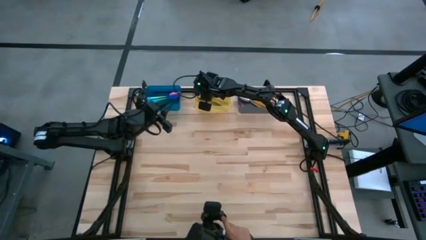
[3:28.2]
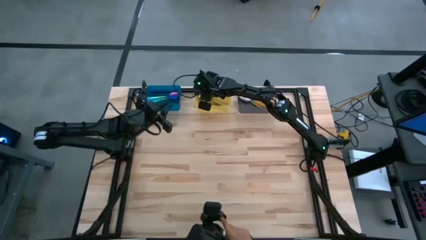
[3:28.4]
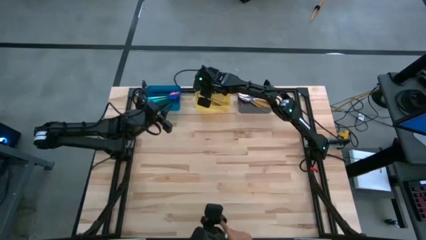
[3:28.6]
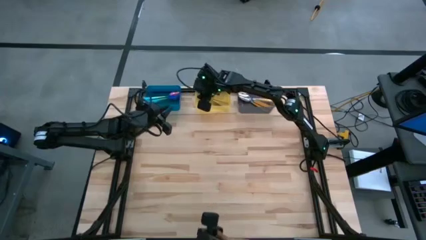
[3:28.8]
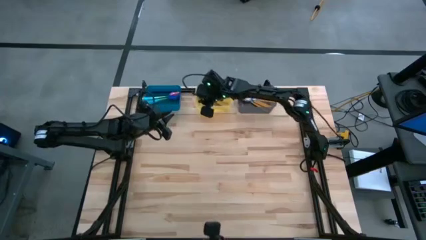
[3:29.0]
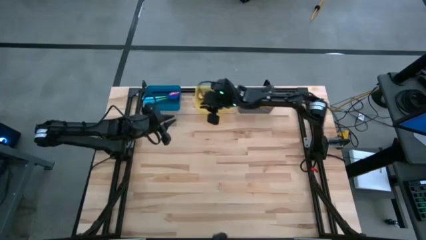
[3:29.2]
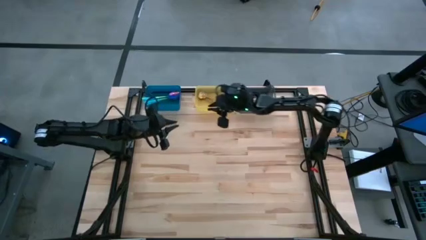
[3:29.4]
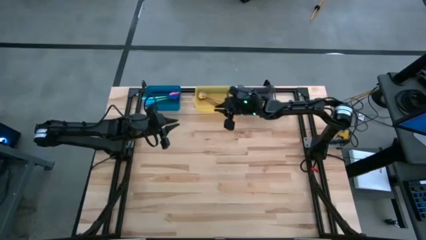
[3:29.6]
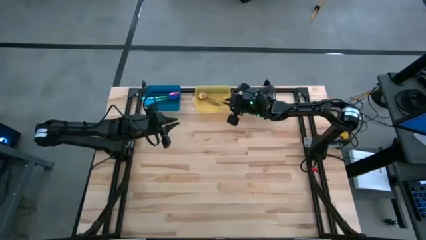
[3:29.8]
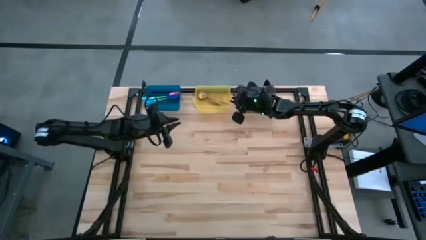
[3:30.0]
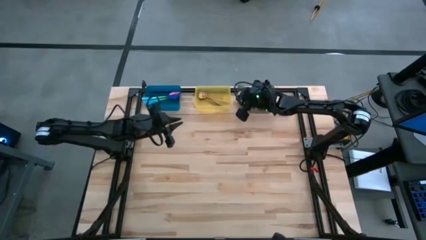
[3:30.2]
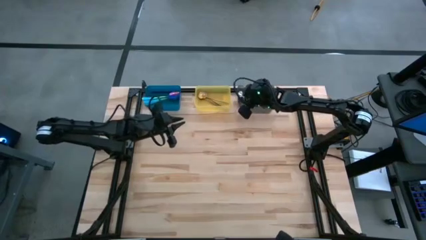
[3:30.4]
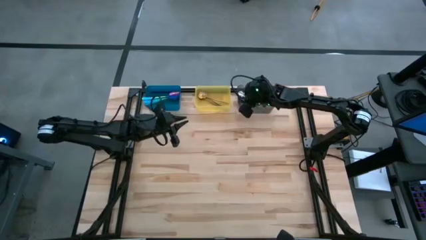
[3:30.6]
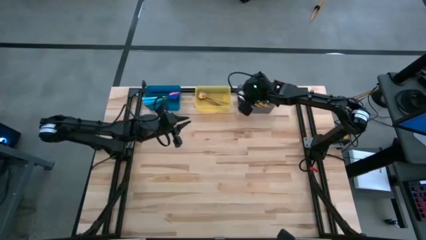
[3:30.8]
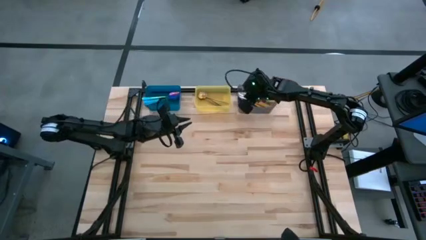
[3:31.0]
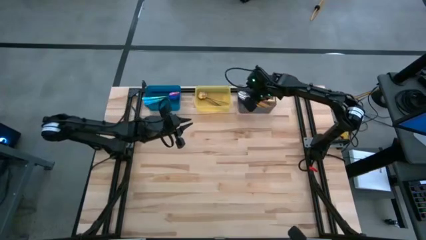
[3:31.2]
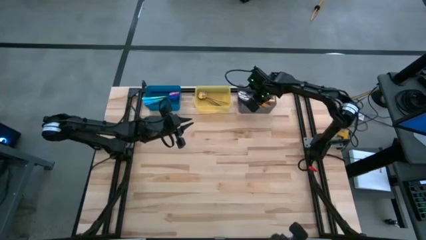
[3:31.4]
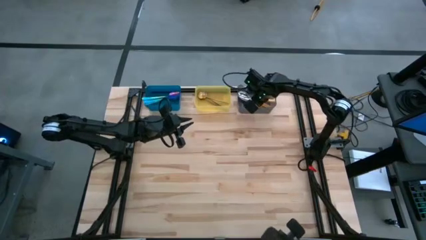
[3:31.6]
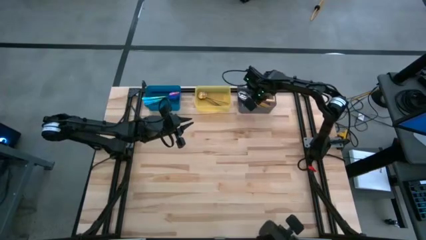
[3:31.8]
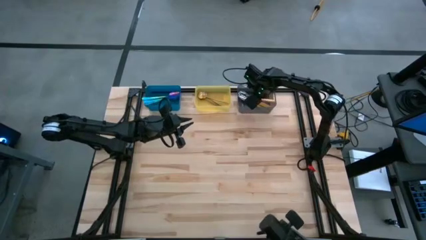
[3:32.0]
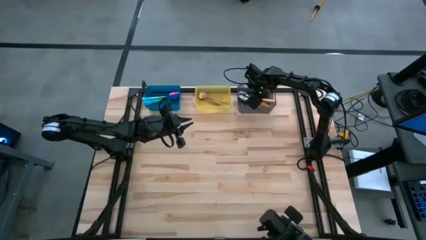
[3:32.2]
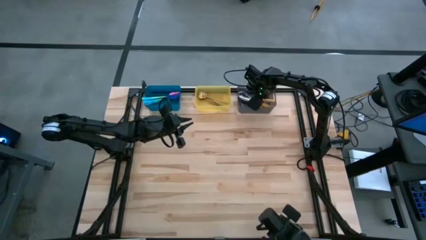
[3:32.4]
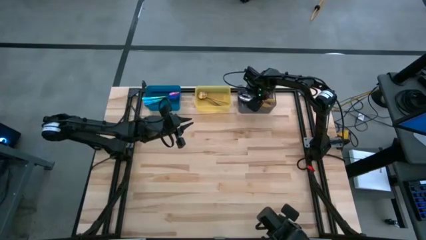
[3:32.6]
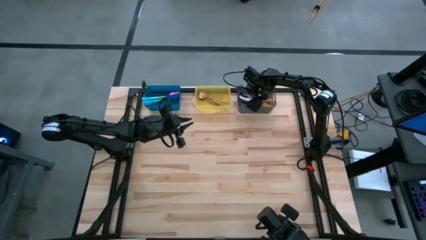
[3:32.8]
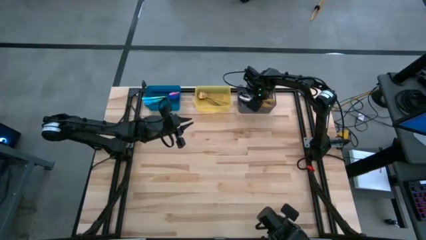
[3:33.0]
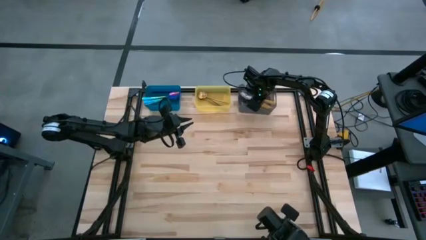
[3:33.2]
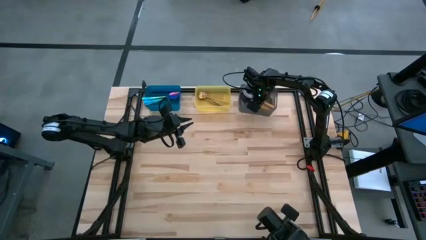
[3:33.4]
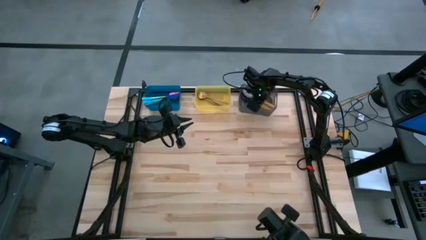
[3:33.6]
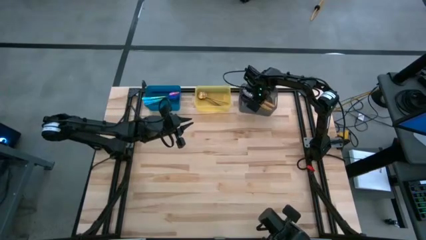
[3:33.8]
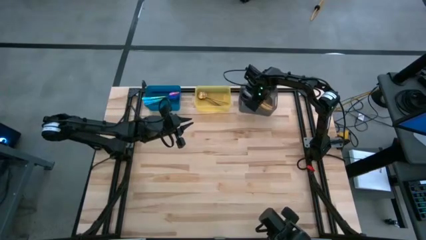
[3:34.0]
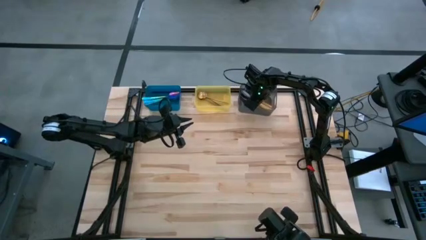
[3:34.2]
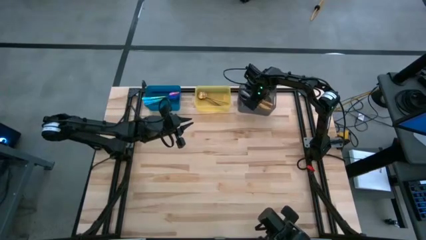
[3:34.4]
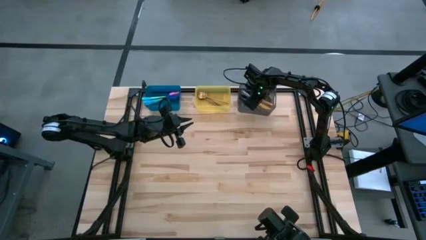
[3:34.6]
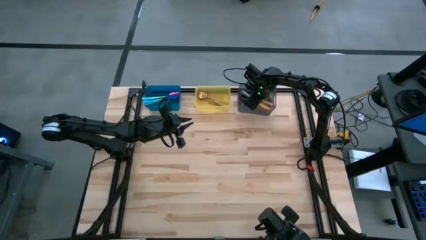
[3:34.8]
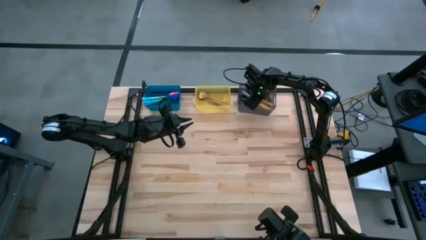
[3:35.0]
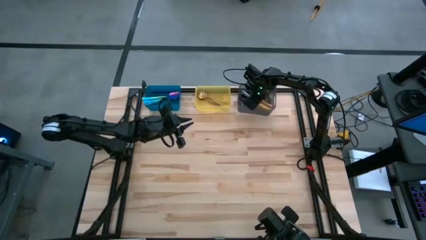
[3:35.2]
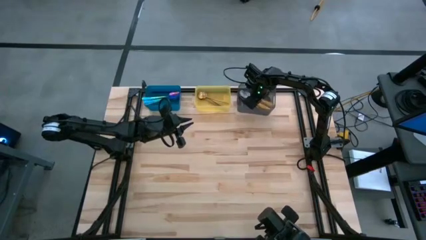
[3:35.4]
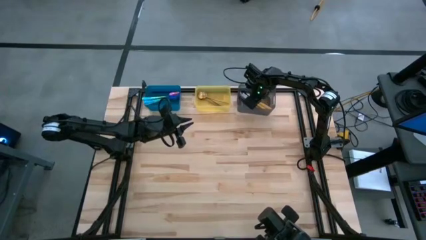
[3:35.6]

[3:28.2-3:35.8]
Task: Sort silverware by color (type)
Adjust the yellow spoon in the black bin

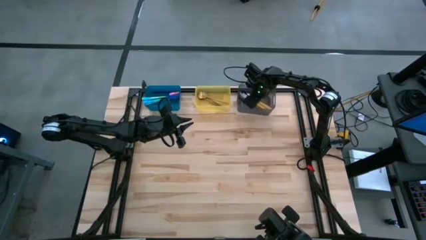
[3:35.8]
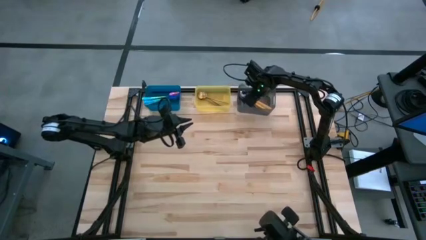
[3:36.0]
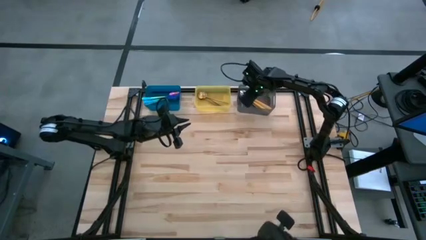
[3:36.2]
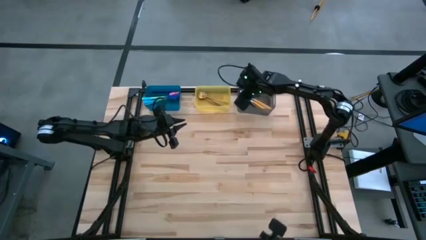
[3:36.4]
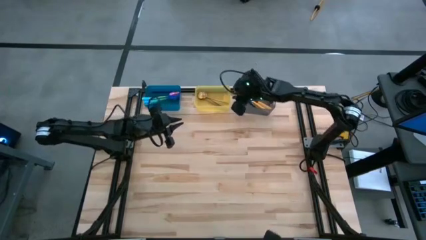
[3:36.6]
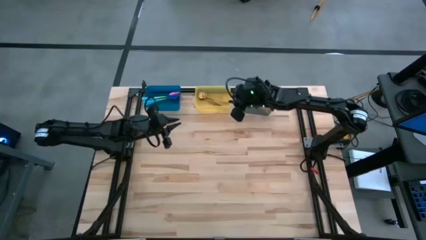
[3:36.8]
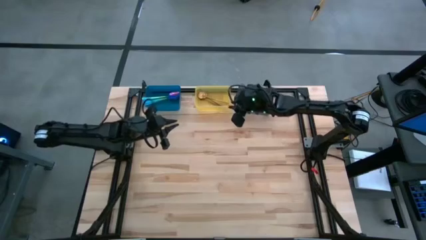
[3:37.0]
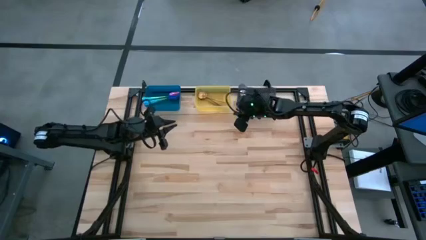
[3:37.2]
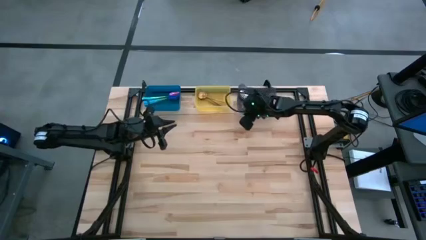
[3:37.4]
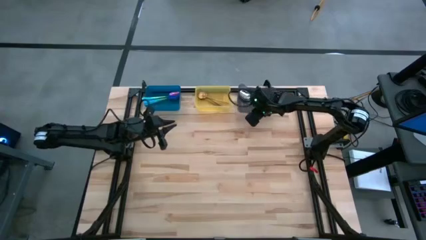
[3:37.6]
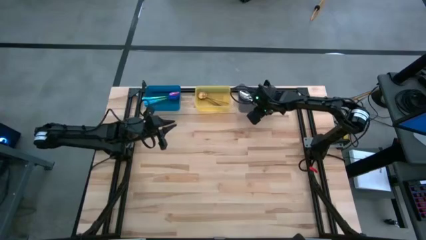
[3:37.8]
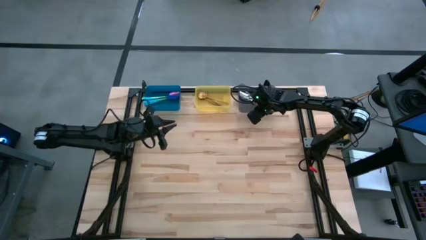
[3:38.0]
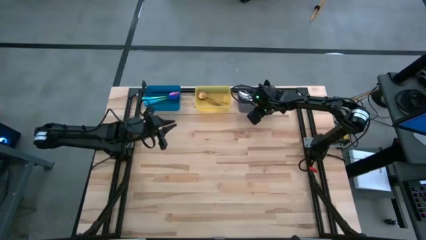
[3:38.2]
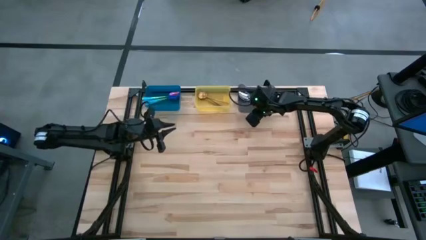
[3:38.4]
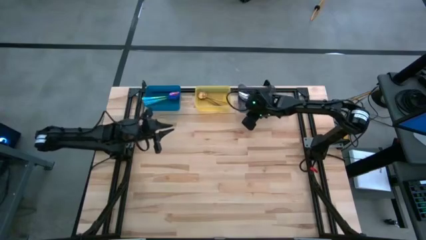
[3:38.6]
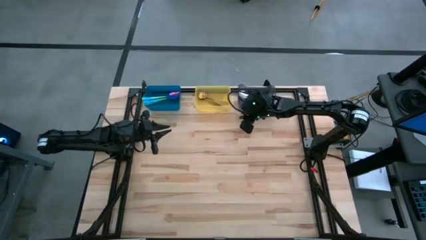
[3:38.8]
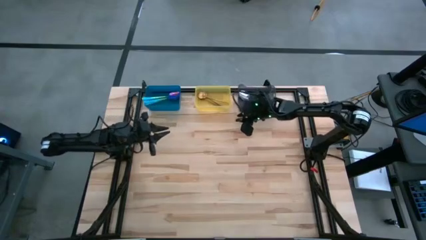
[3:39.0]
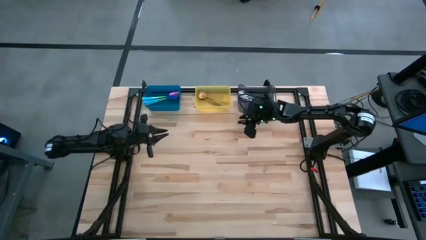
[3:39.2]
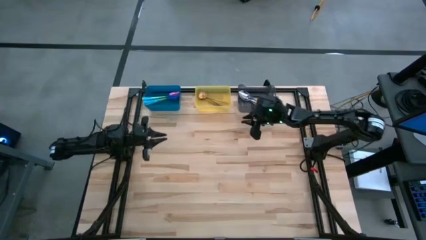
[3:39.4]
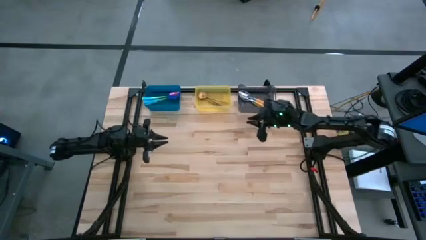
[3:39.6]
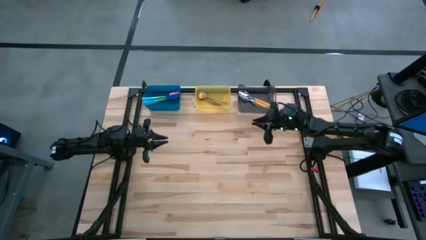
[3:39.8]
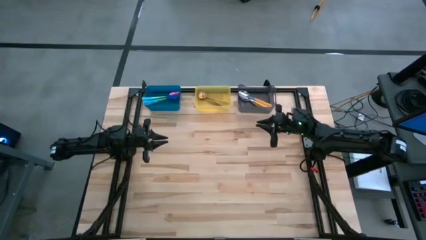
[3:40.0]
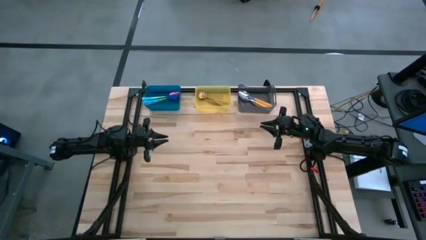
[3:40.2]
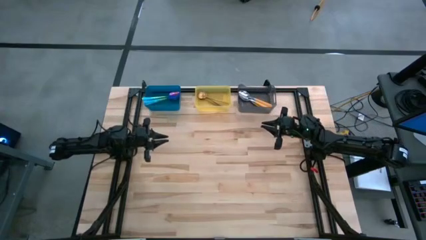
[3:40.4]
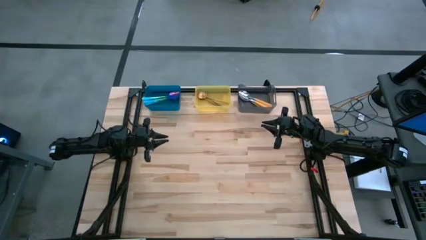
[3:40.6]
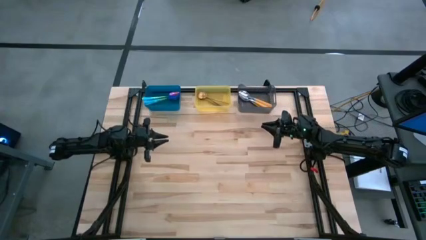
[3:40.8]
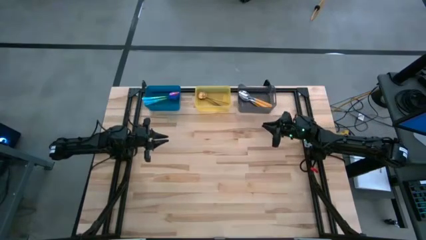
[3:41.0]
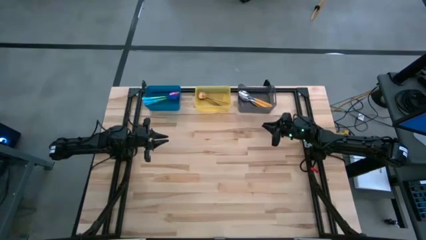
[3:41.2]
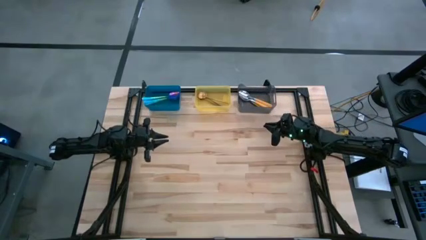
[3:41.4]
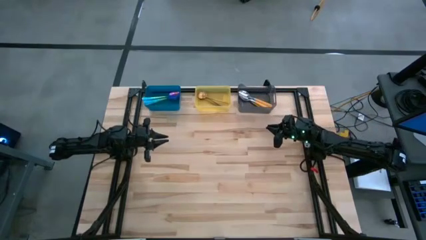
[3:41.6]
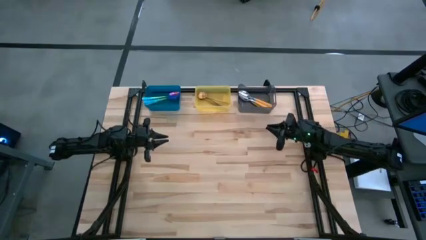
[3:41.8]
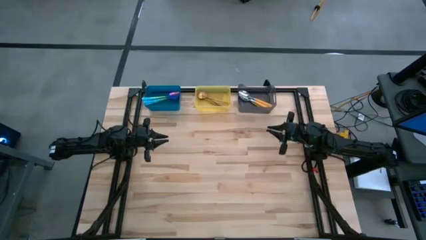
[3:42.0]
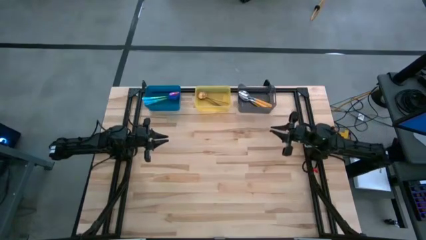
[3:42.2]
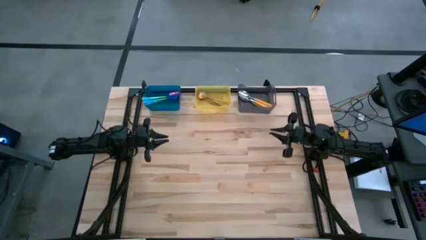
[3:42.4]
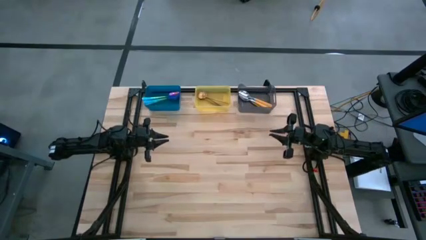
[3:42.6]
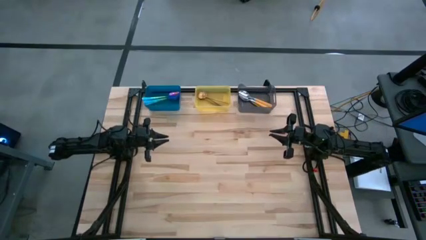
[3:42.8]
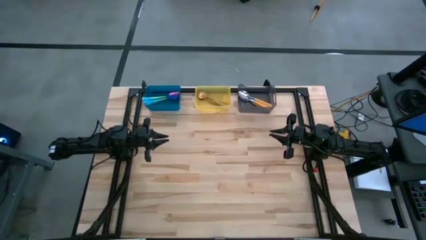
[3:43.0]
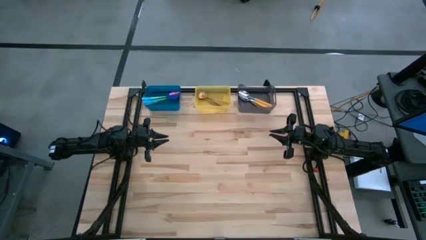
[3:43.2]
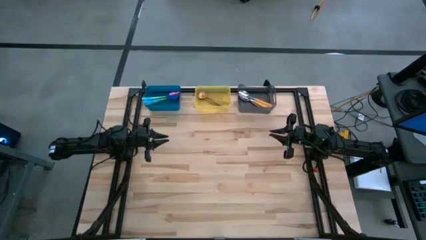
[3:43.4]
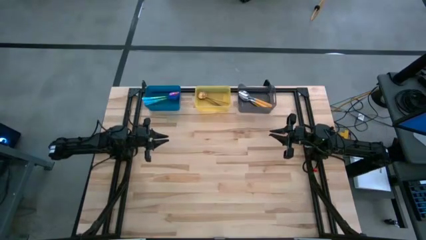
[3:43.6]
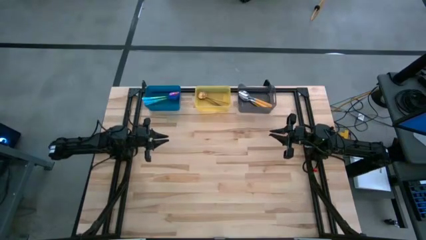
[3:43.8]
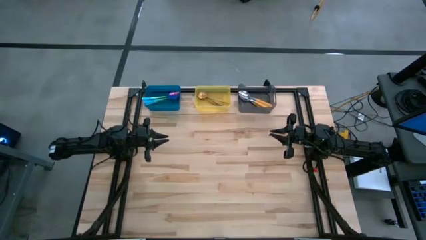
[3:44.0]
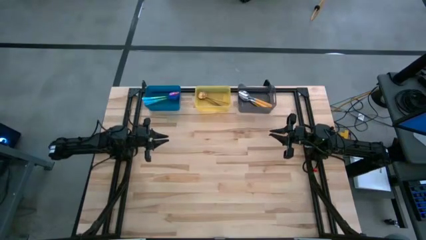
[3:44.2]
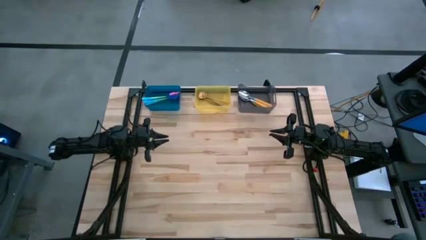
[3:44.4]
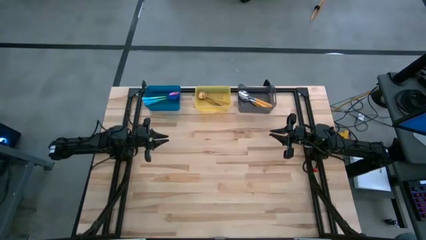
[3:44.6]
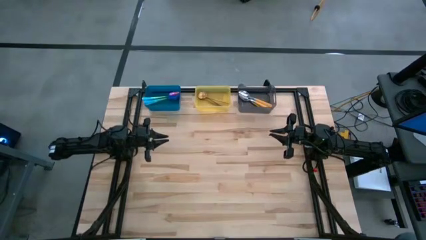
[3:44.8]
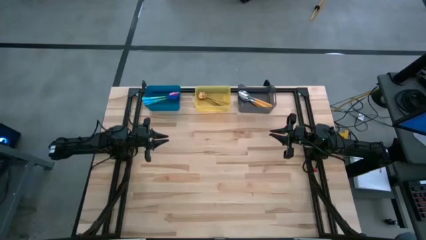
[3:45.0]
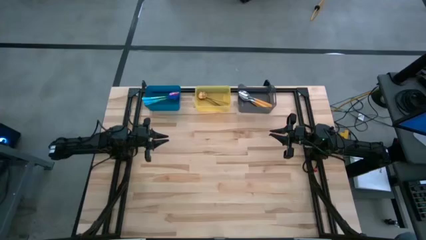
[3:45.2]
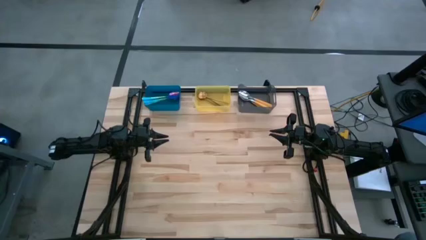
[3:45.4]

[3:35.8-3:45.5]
Return to Home Position
